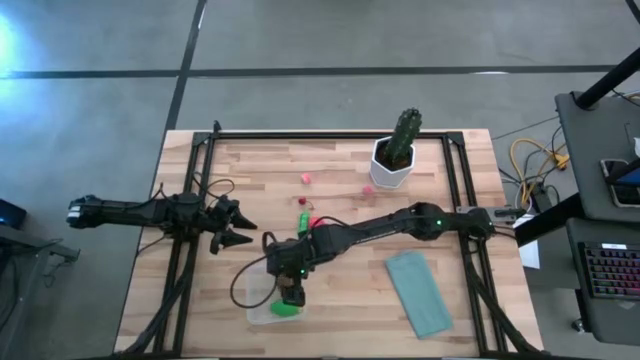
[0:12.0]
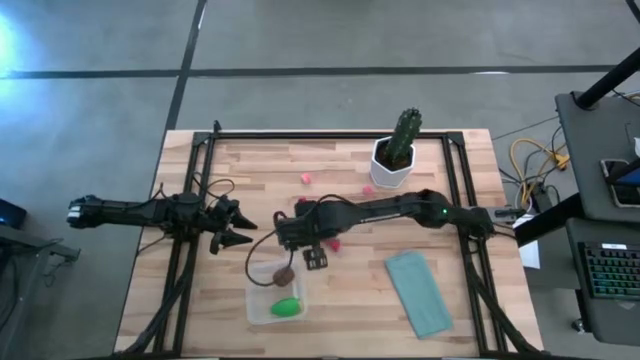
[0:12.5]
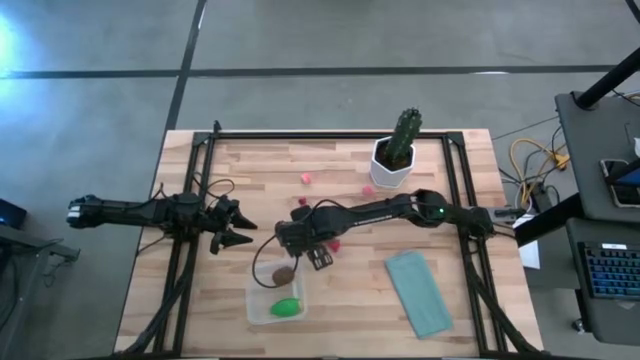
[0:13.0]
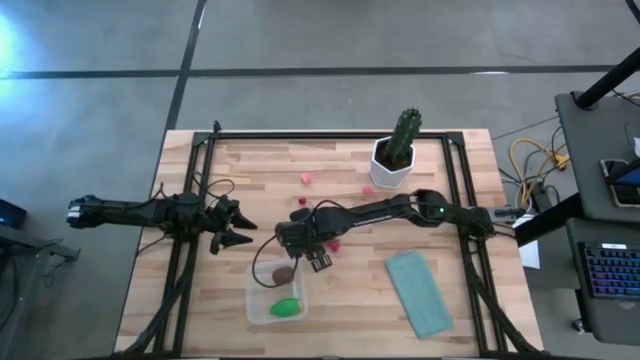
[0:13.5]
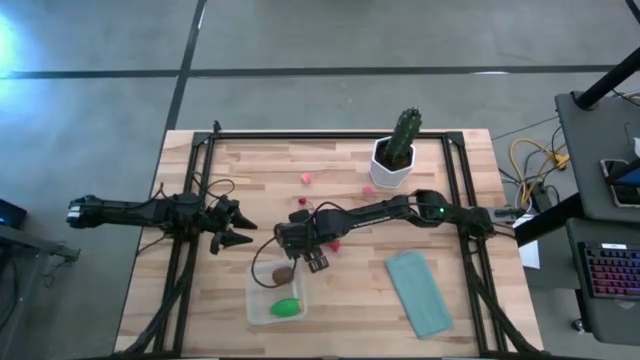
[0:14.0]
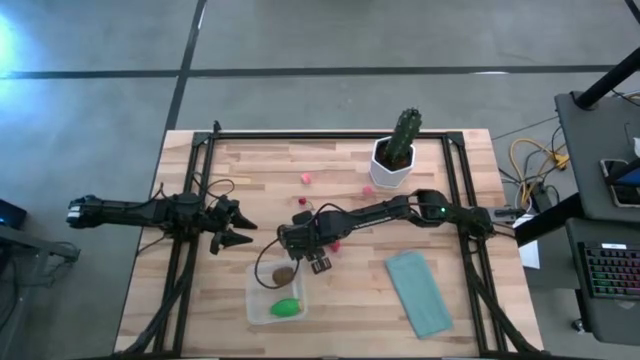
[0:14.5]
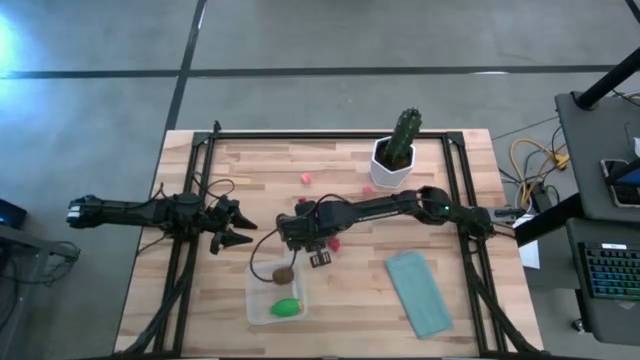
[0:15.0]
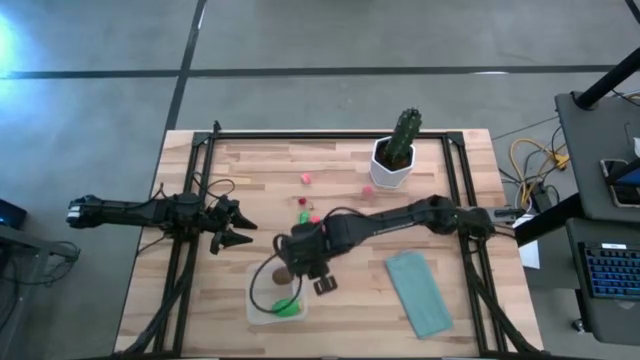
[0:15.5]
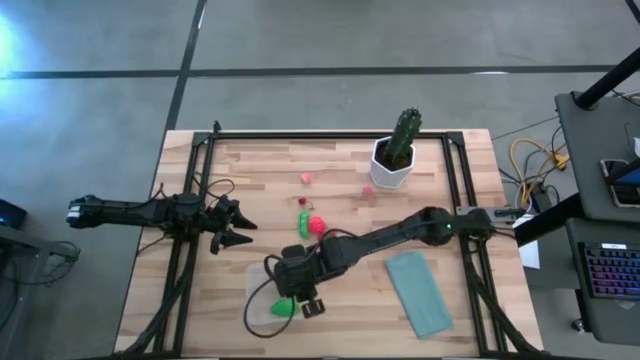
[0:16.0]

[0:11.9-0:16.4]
Task: Pick and placing Produce into tupperware
Put the bottom pink peach into the transparent bin

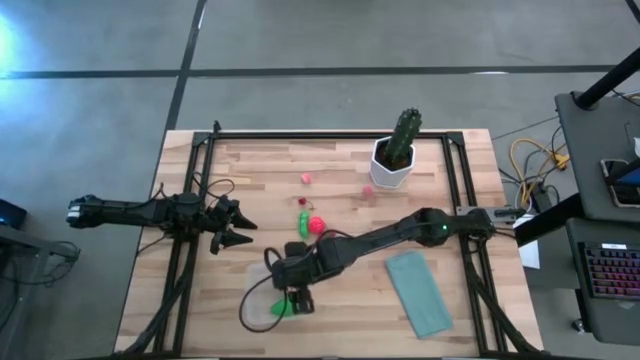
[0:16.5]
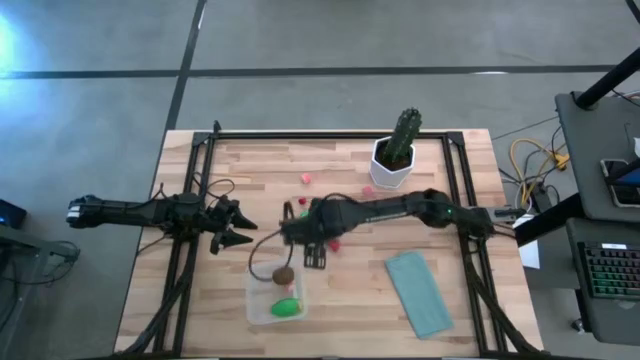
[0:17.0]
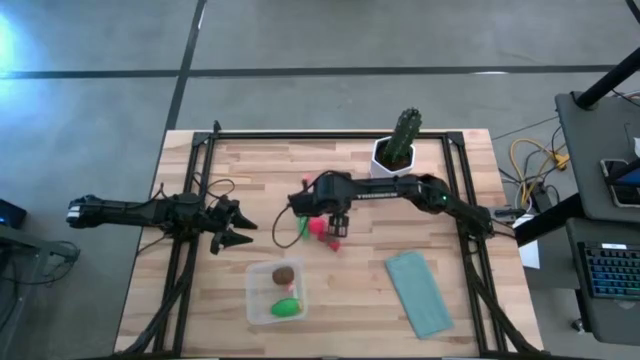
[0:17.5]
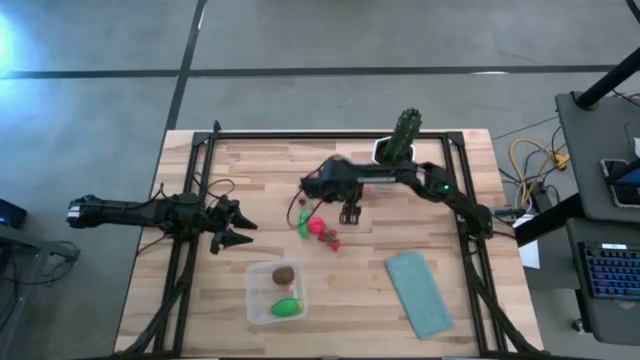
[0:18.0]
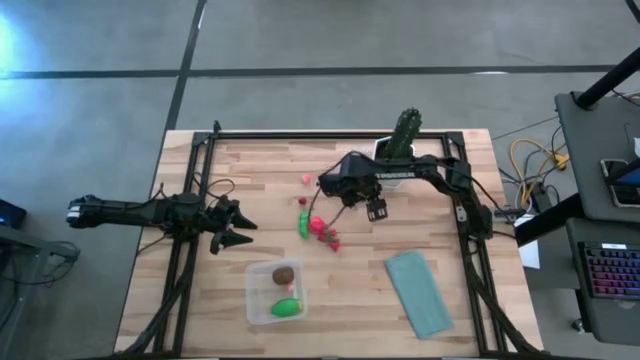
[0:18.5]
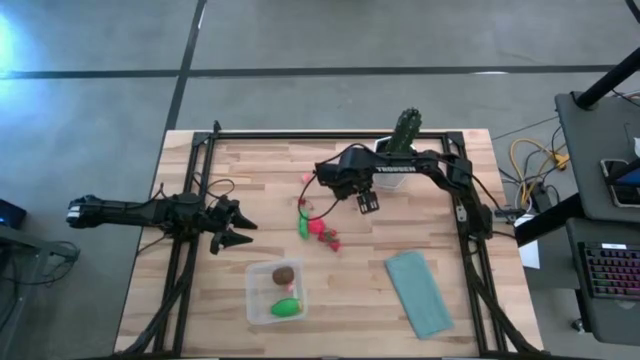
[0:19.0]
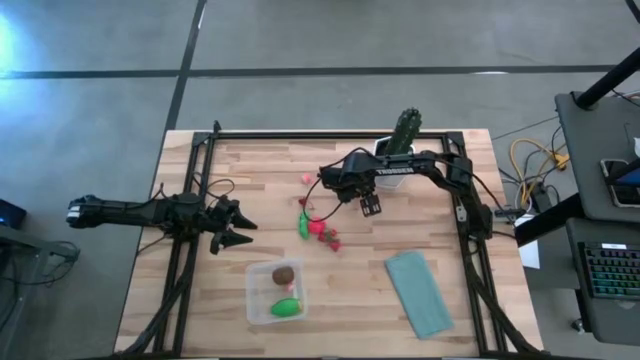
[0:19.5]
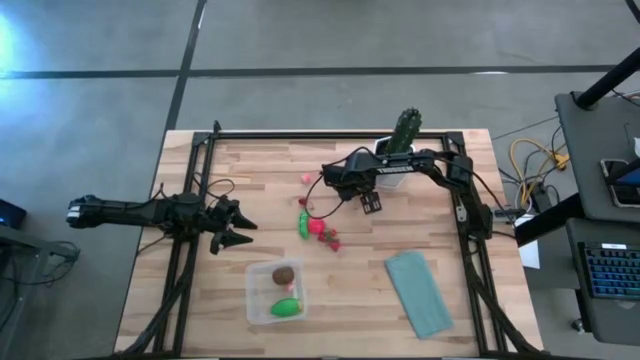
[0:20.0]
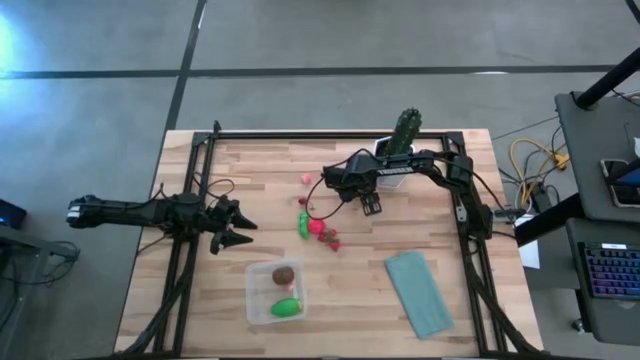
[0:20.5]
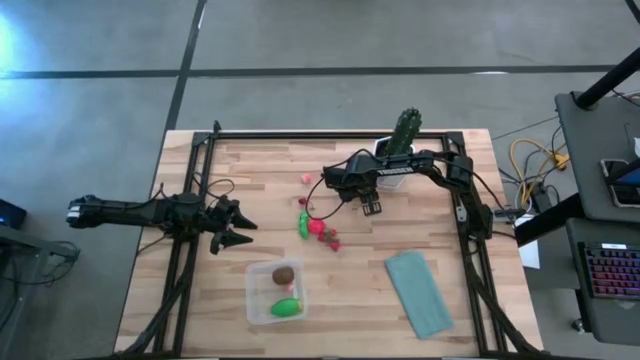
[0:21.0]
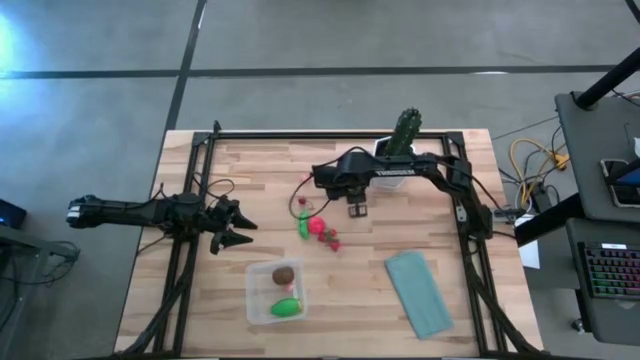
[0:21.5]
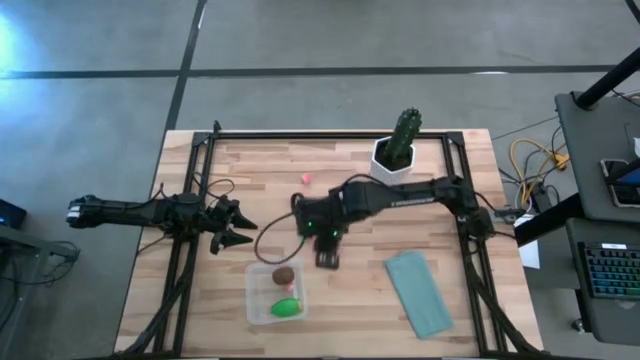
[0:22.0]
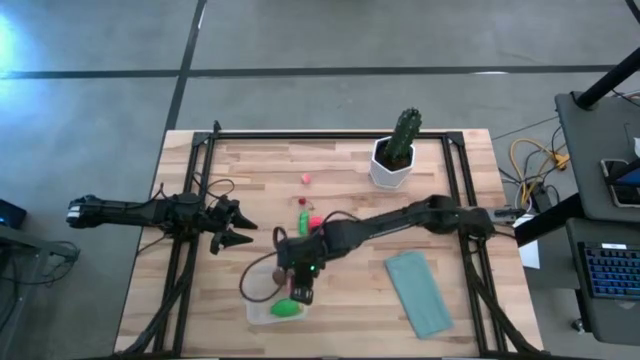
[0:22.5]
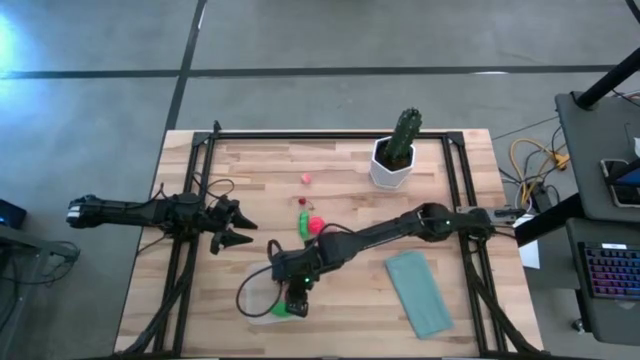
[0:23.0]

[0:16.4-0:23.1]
Put the right pink peach into the transparent bin

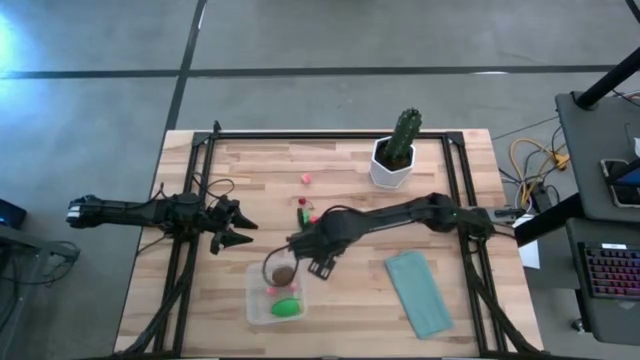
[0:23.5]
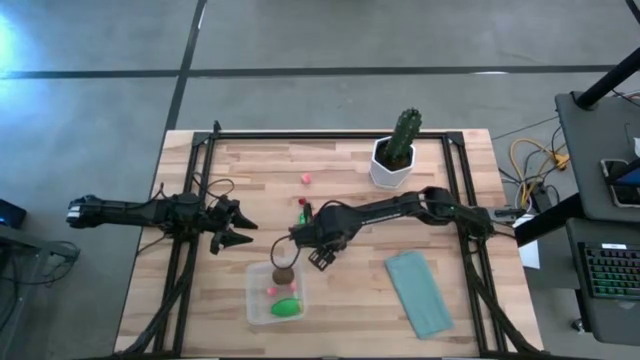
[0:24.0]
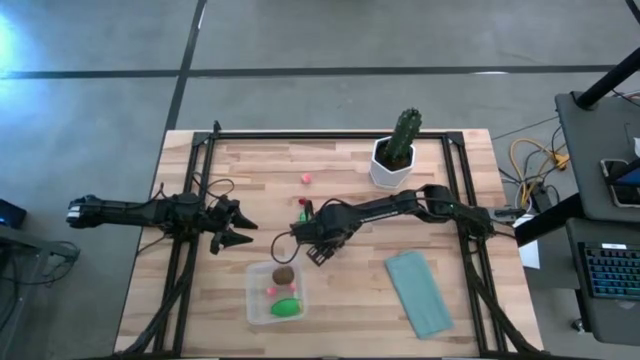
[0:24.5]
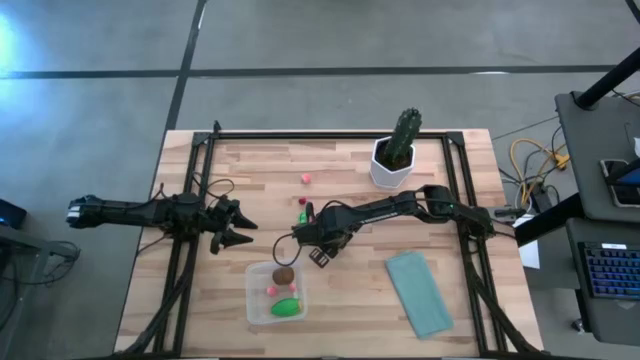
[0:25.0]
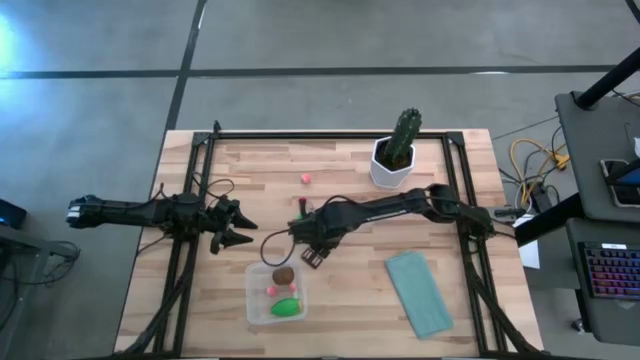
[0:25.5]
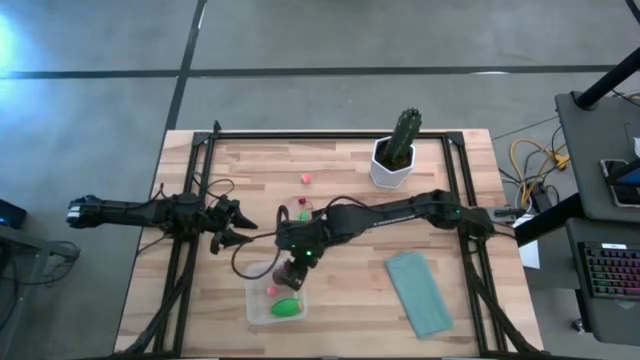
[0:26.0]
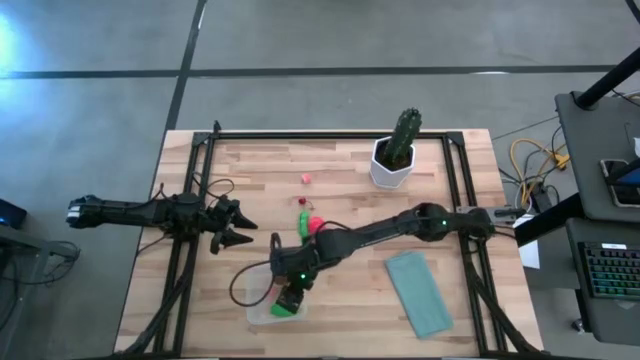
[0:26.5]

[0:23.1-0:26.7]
Put the right red strawberry into the transparent bin

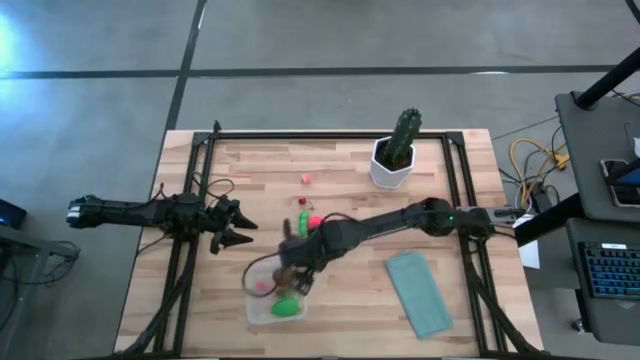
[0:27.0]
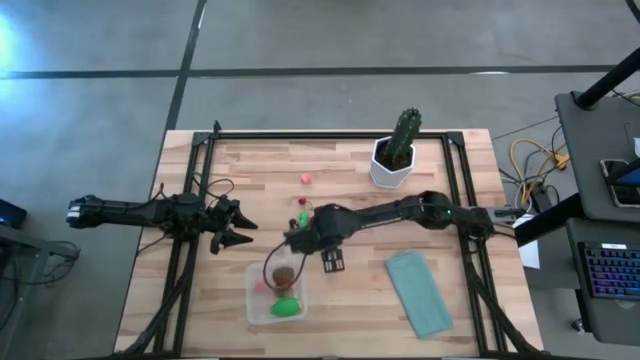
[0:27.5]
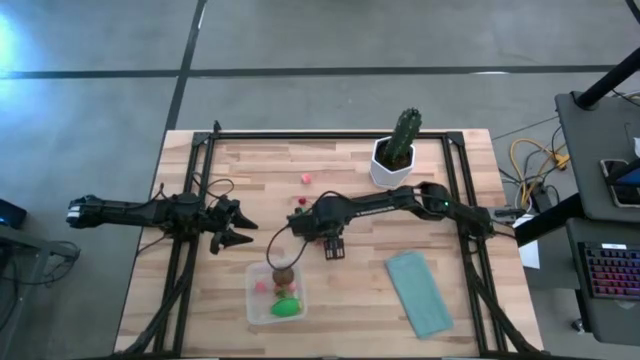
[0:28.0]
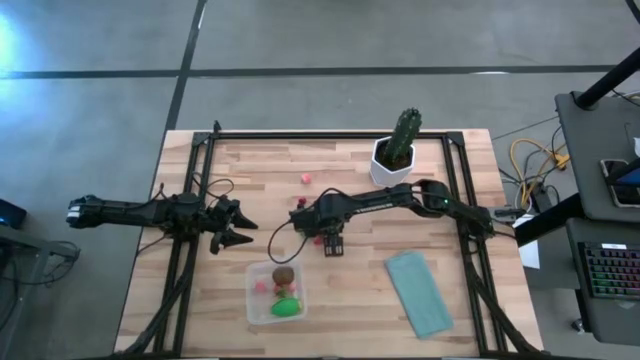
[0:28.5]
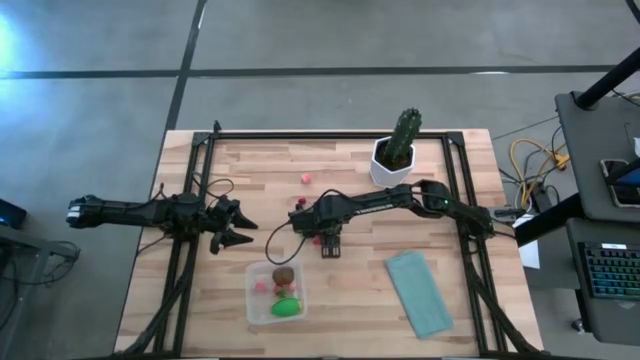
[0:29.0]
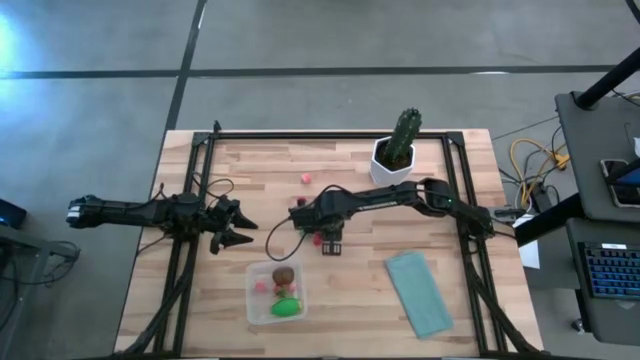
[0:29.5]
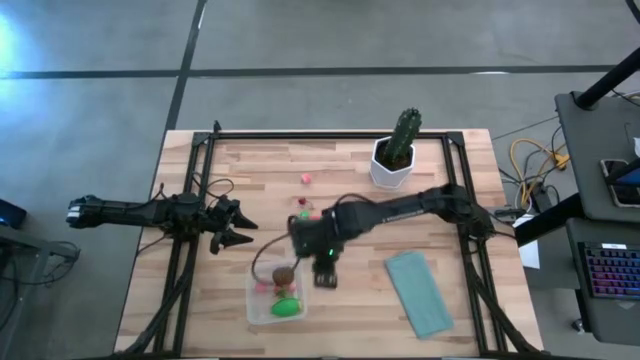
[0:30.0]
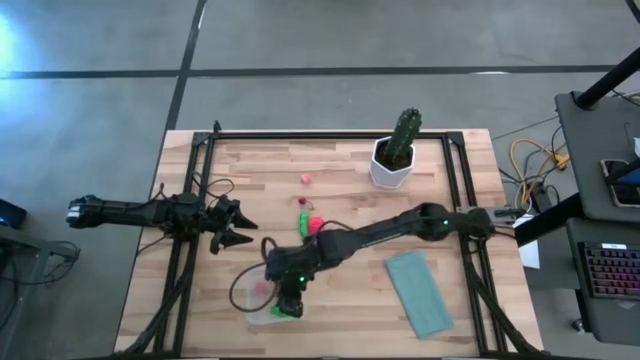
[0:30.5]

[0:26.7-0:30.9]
Put the bottom red cherry into the transparent bin

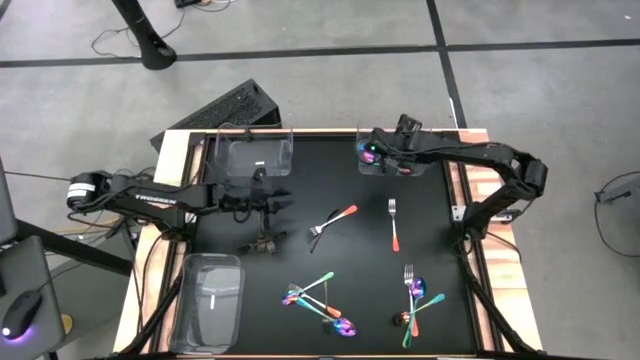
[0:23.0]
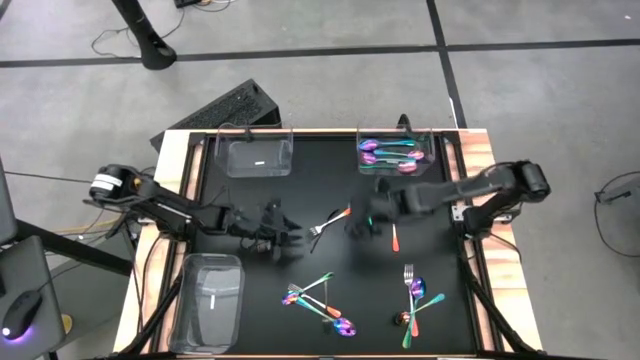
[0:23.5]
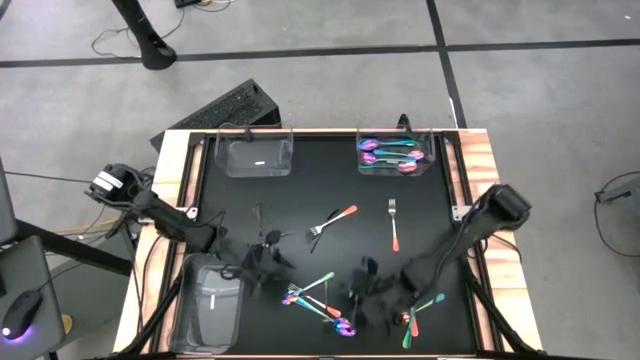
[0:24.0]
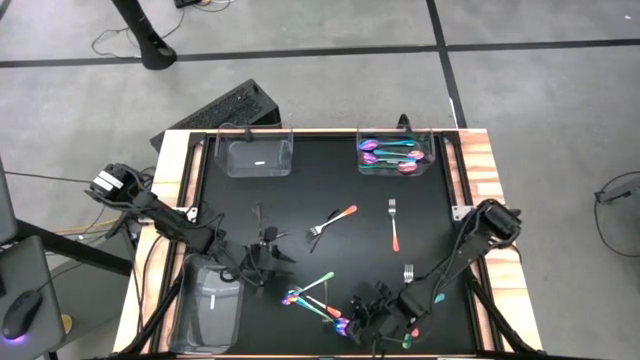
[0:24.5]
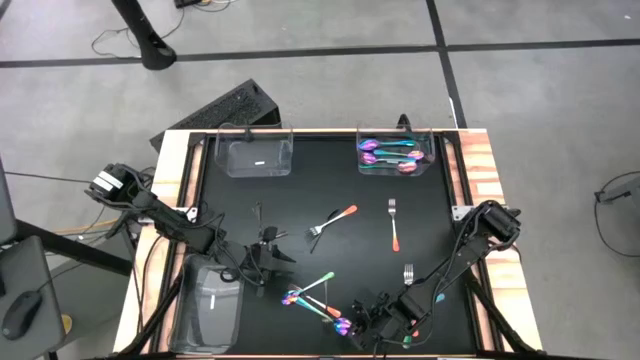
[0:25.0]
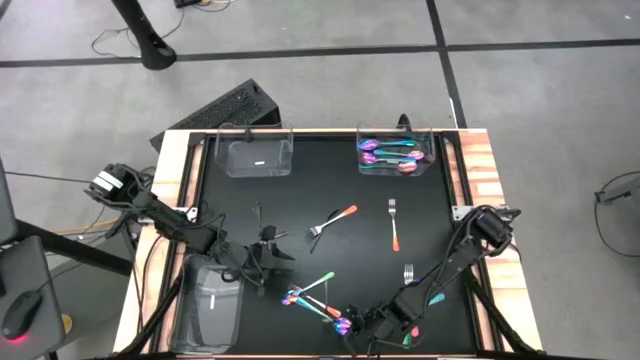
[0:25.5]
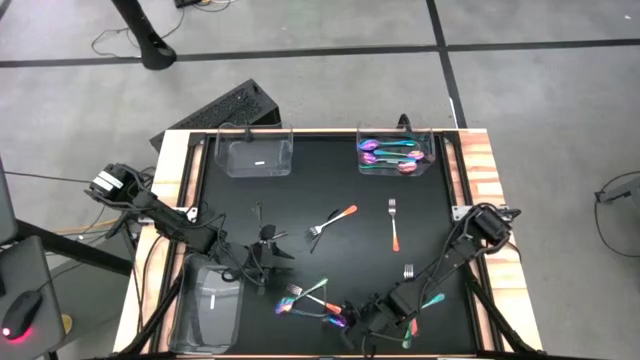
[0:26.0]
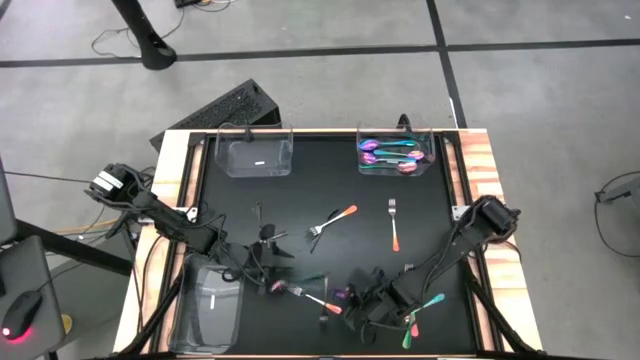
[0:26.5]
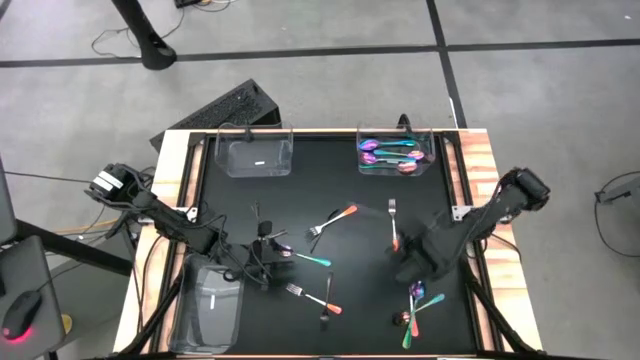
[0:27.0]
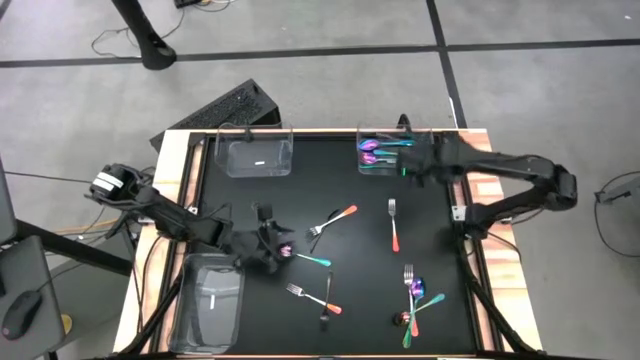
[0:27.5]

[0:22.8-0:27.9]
Task: Sort silverware by color (type)
Put the blue spoon into top right transparent bin
